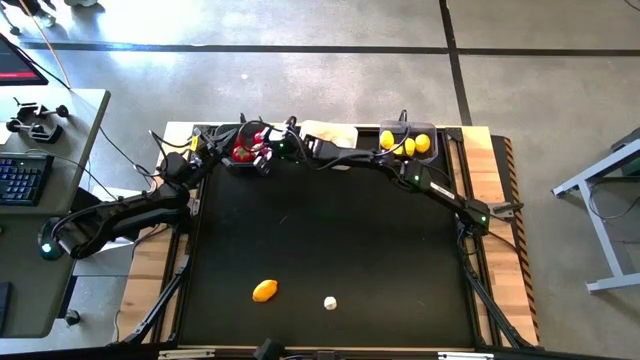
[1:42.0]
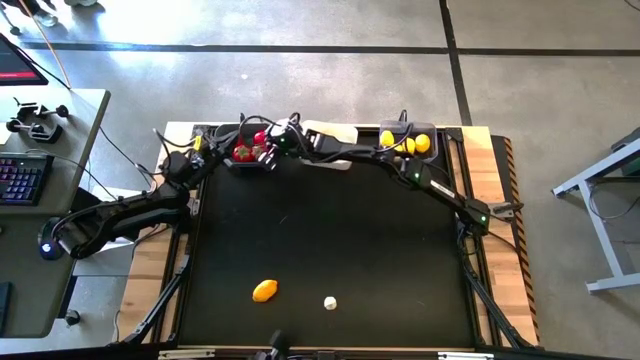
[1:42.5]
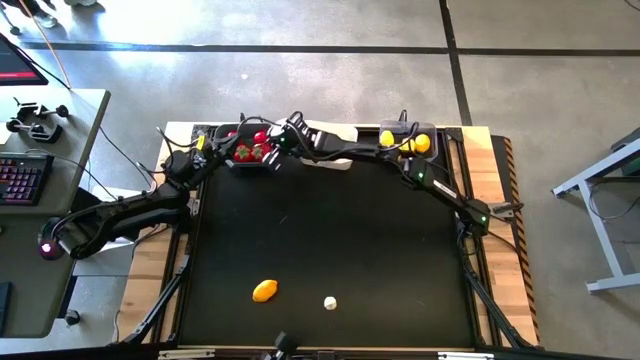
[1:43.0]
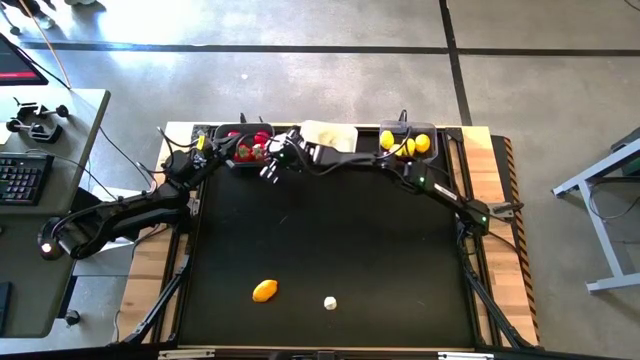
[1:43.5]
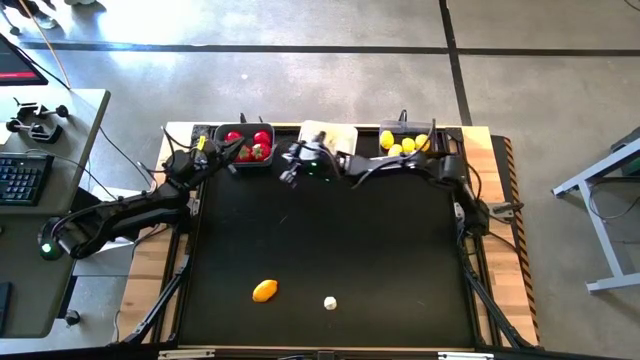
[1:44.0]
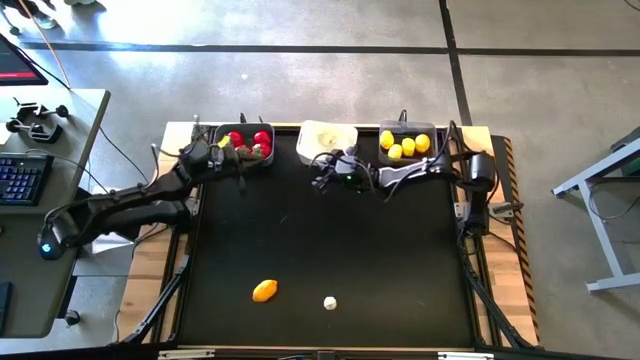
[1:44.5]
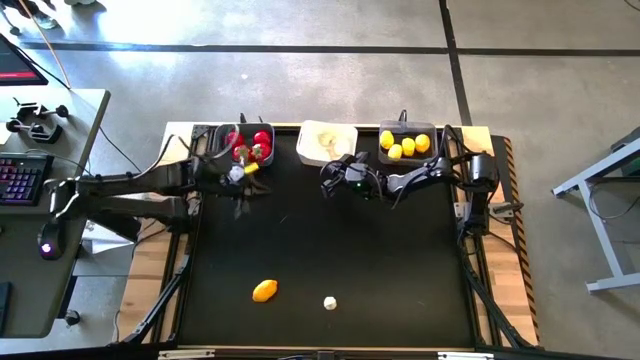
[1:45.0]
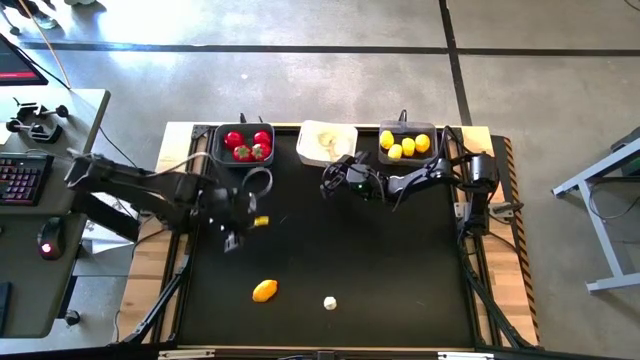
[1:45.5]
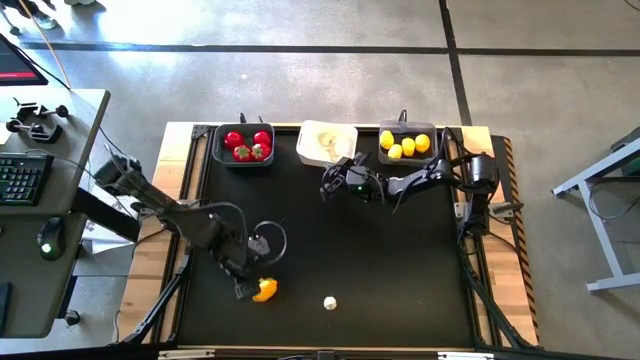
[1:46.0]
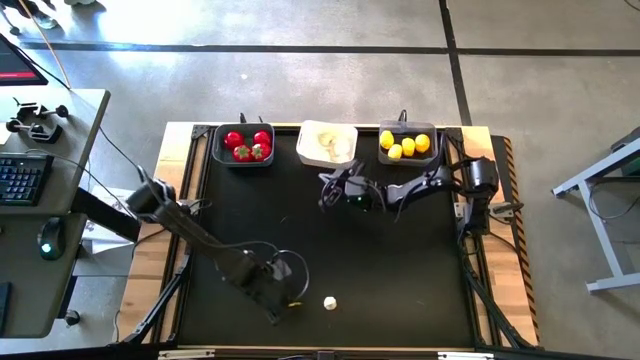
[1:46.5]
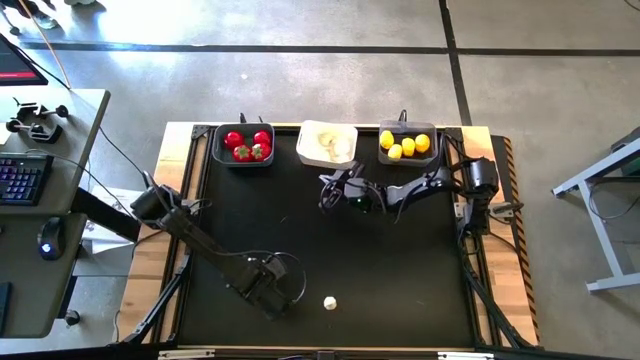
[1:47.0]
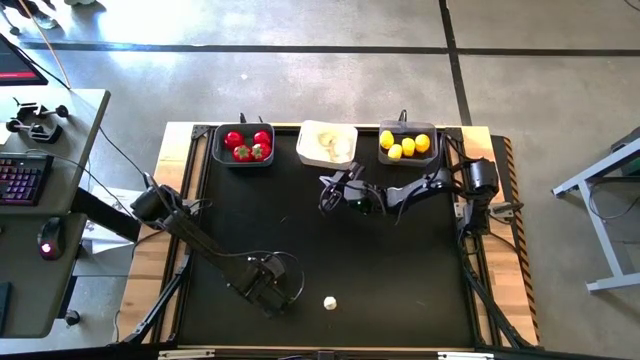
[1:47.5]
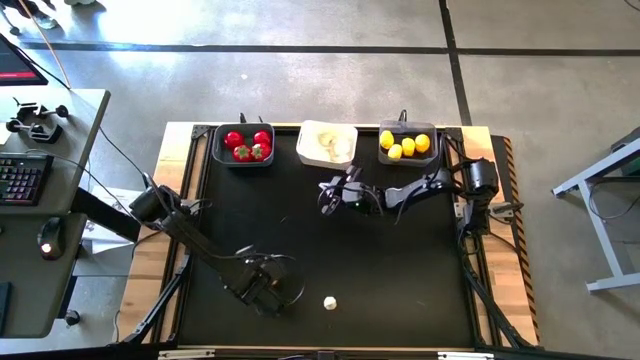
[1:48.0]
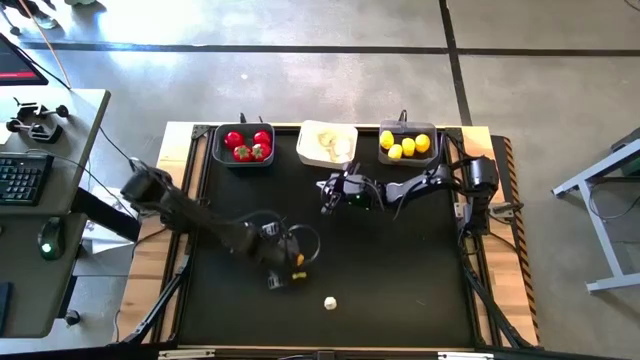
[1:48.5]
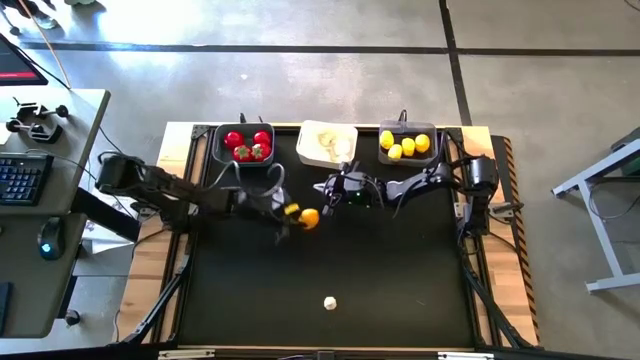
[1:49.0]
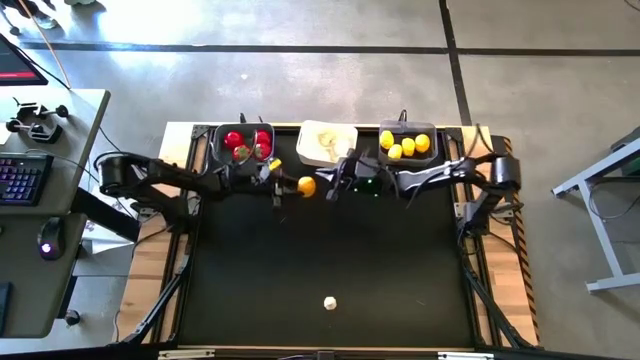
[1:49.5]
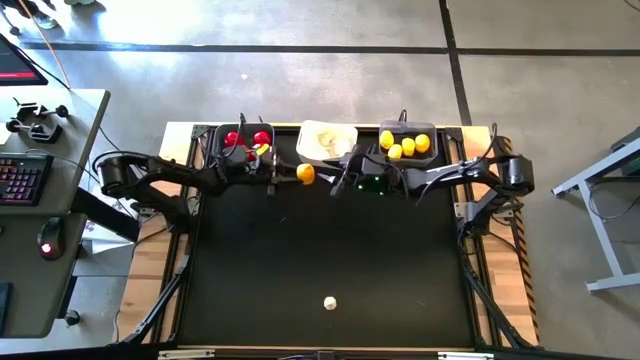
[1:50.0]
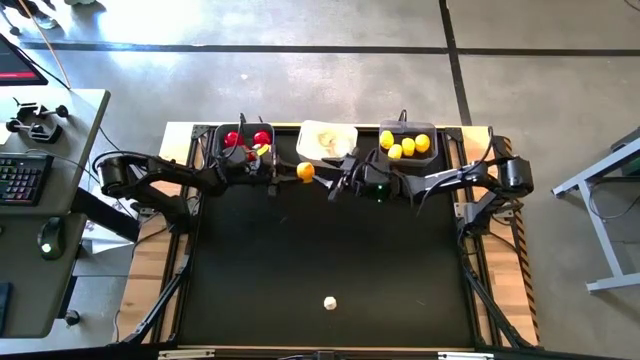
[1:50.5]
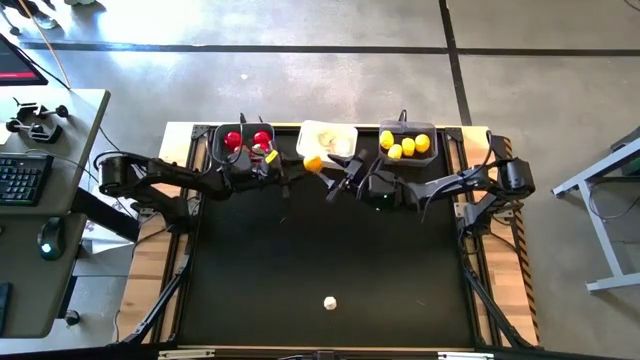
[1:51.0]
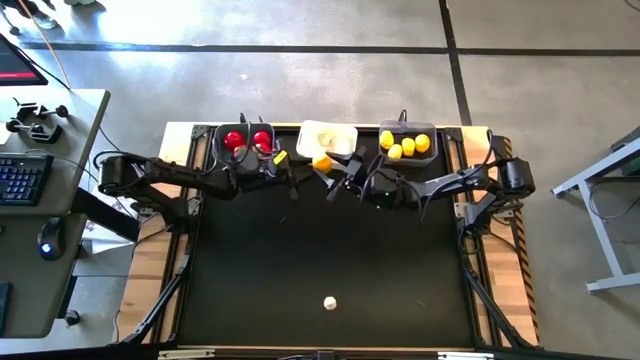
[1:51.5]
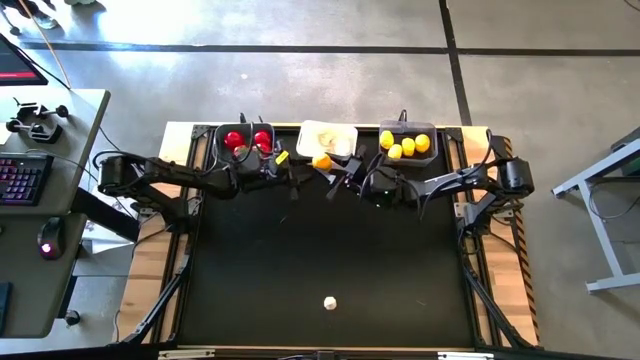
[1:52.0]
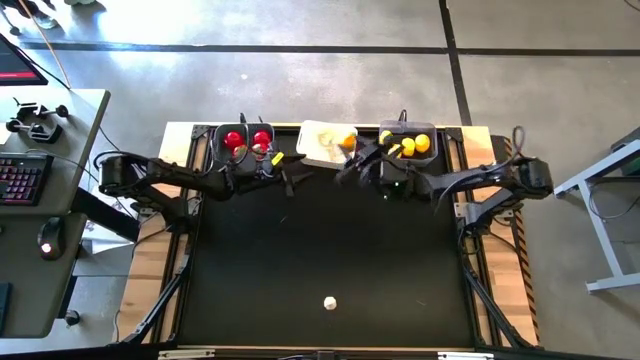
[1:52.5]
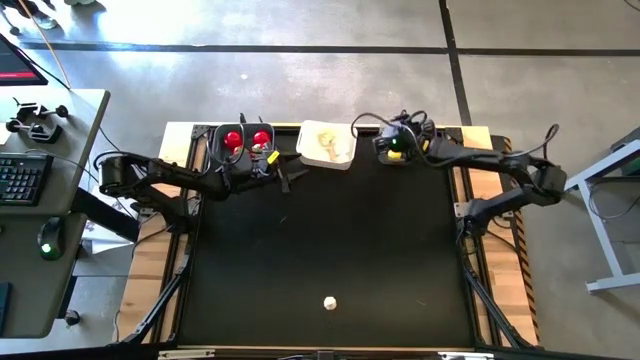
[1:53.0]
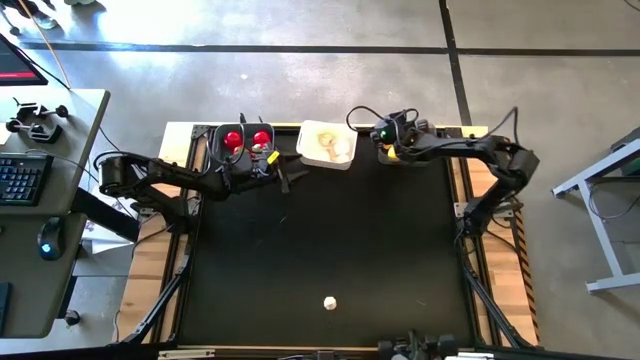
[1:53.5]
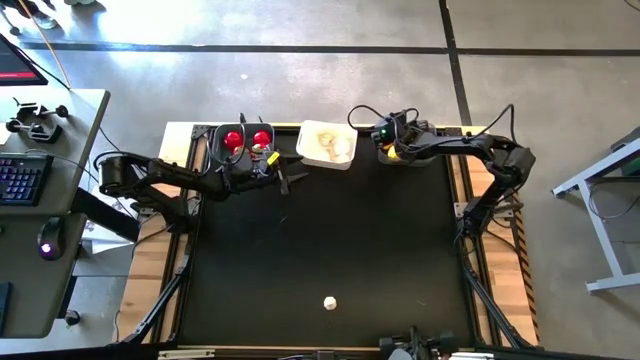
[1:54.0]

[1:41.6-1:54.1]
Task: Sort produce into baskets
Put the yellow lemon into the transparent bin

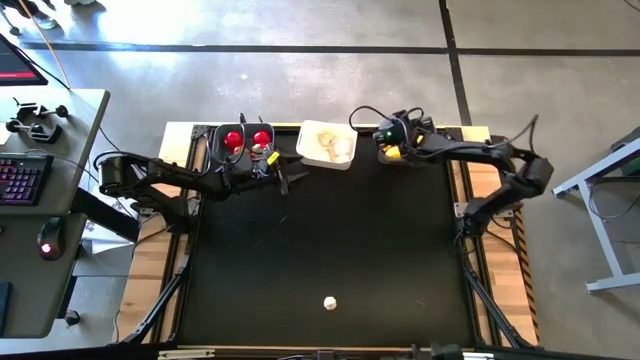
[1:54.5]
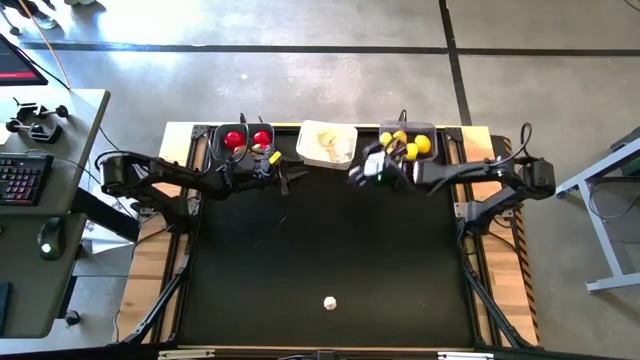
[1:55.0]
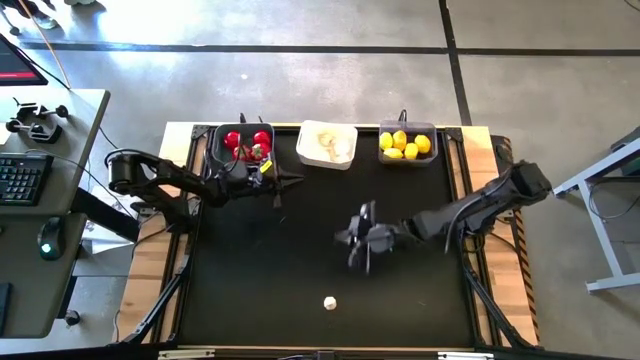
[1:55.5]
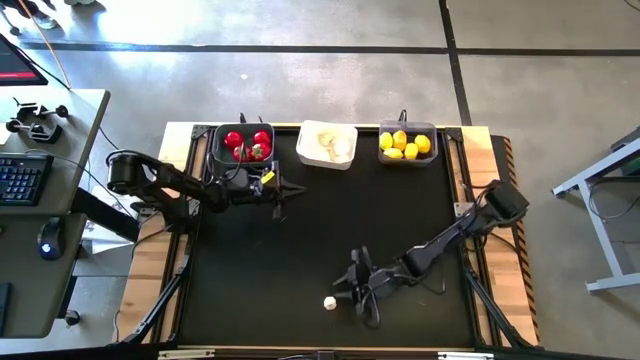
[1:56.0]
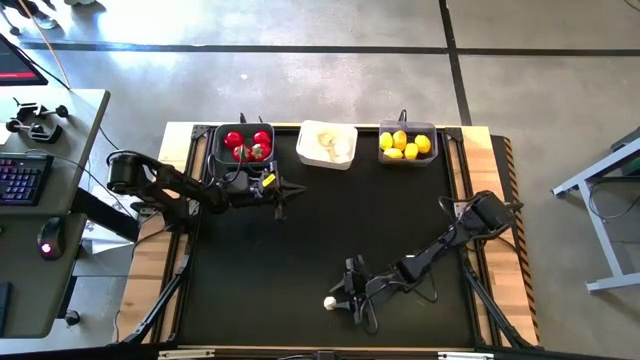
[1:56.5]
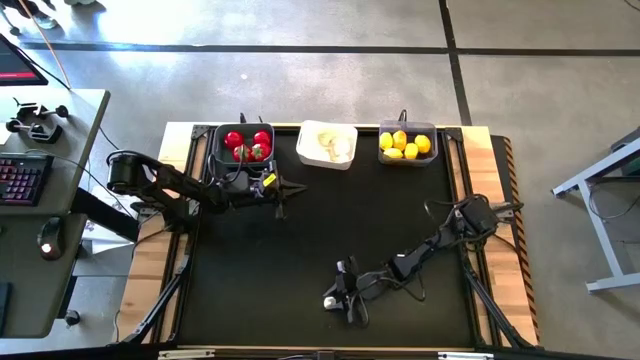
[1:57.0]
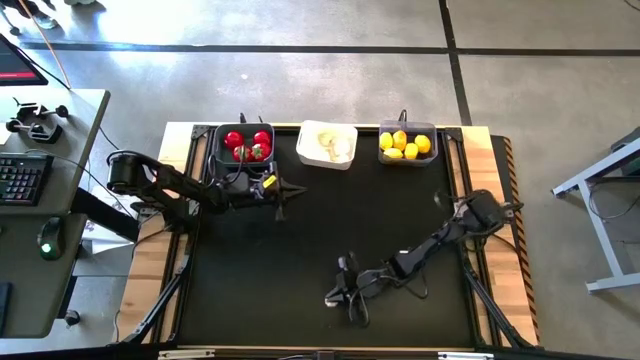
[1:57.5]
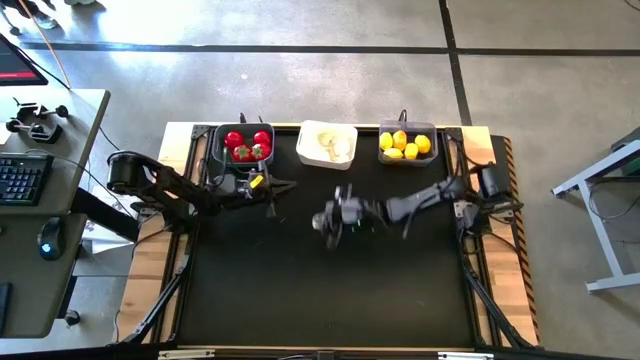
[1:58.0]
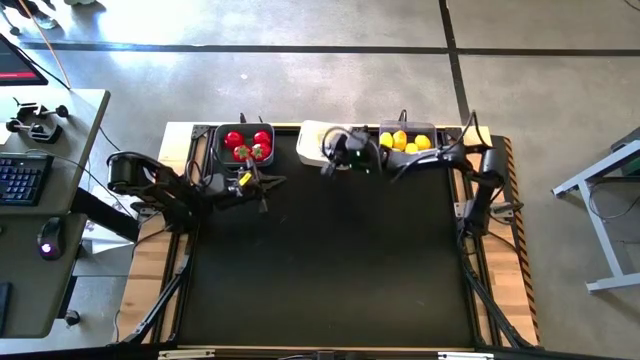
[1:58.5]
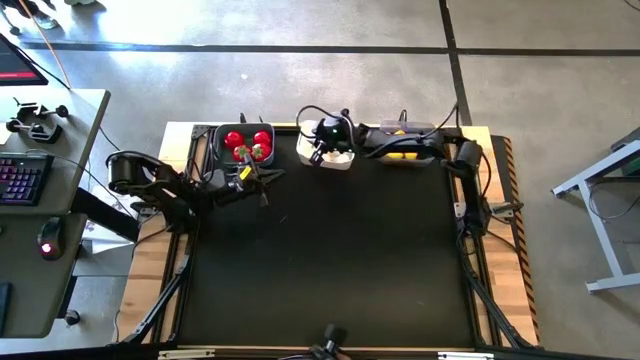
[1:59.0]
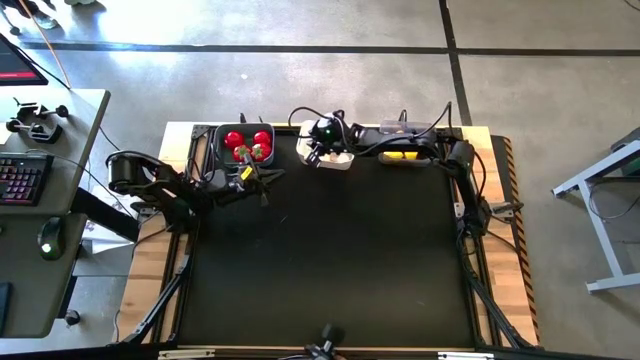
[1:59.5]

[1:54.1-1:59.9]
Put the white garlic into the white bin

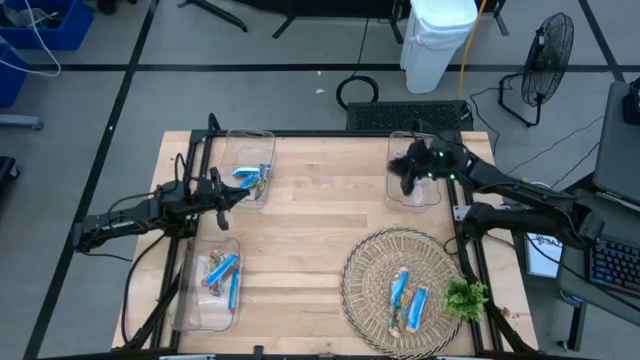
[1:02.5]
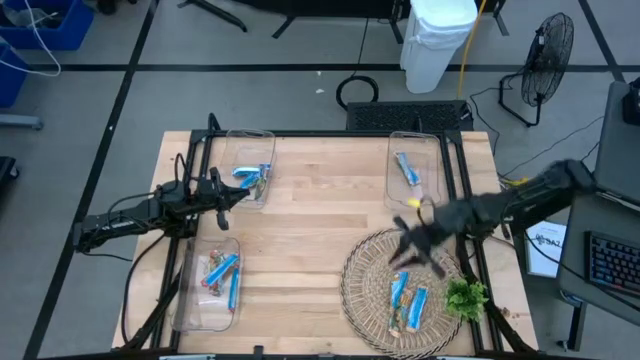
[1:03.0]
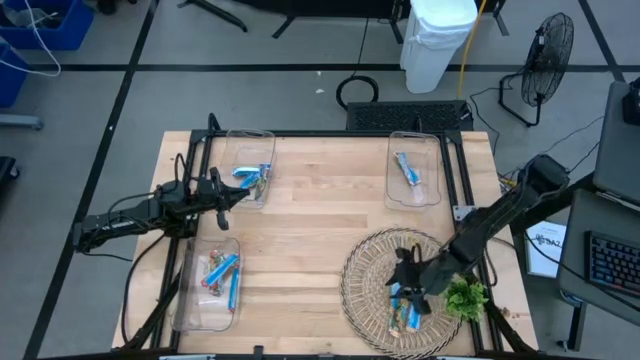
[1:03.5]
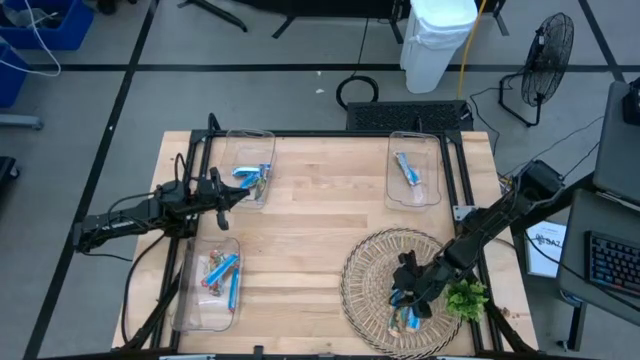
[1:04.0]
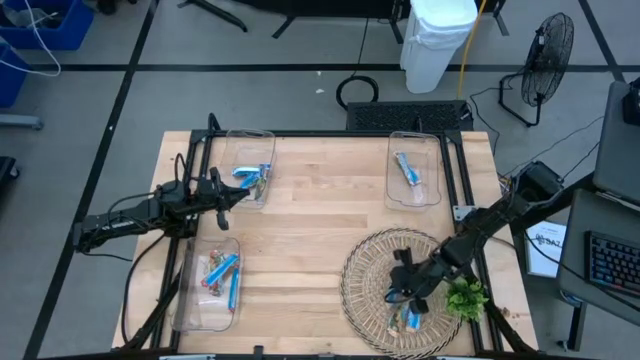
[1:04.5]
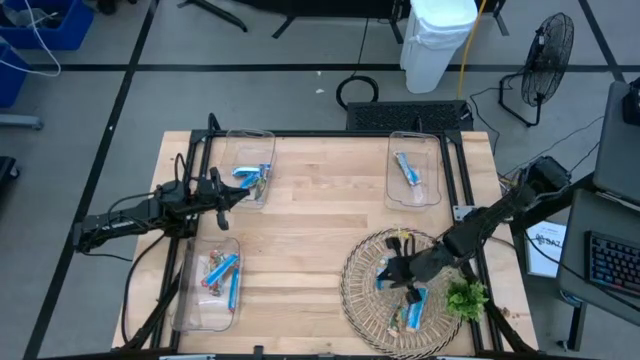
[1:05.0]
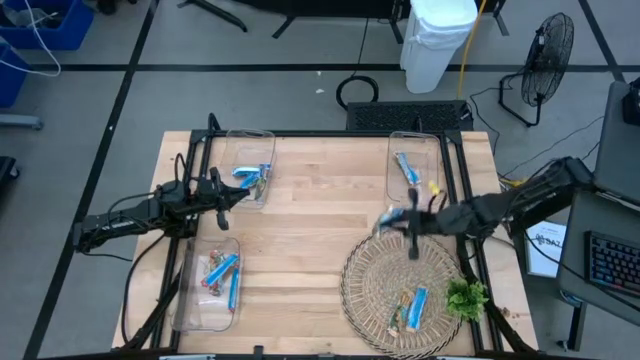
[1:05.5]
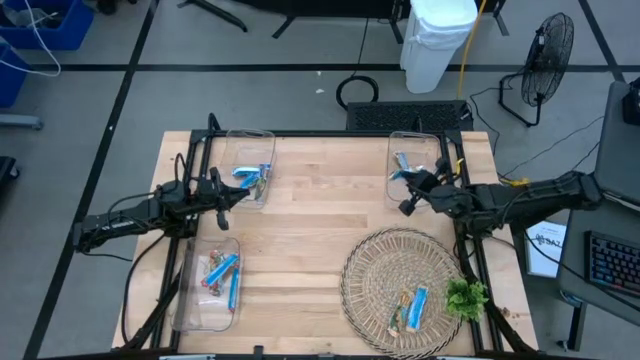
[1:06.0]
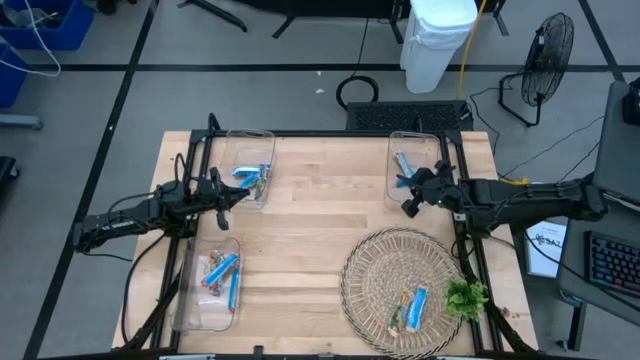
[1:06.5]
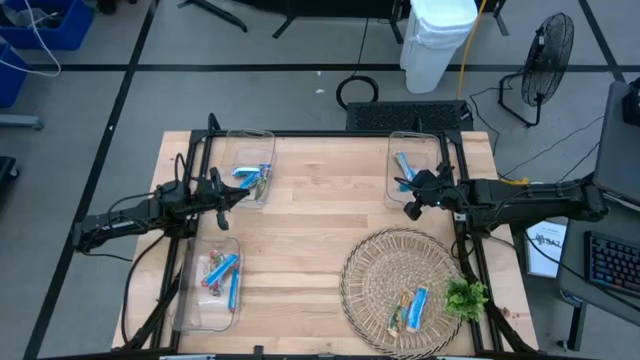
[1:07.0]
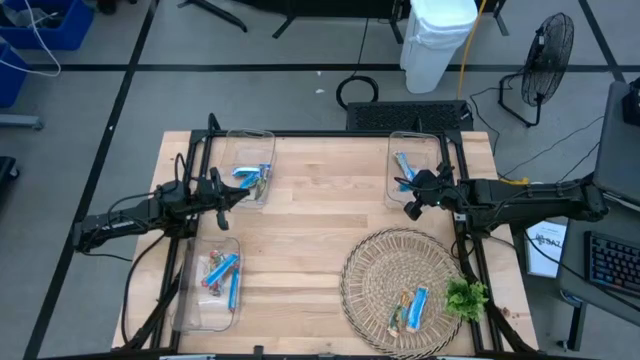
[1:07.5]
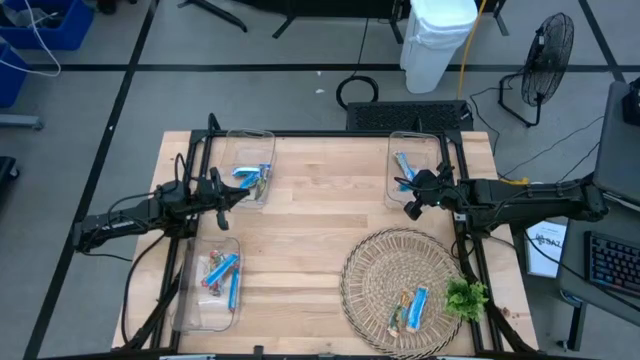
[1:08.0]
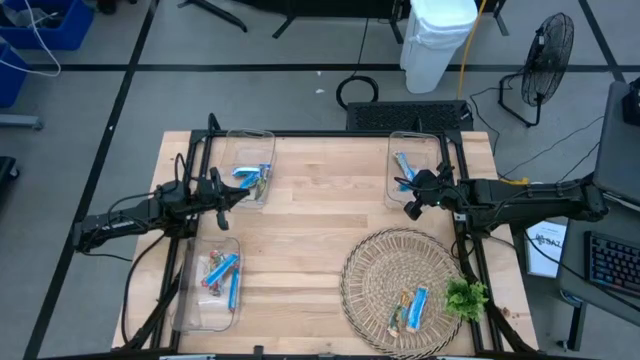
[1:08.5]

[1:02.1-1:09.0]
Task: Pick and place Granola Bars by type
Put the yellow granola bar into the top right transparent bin
